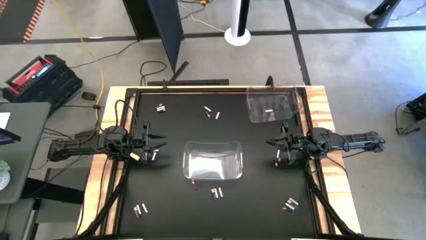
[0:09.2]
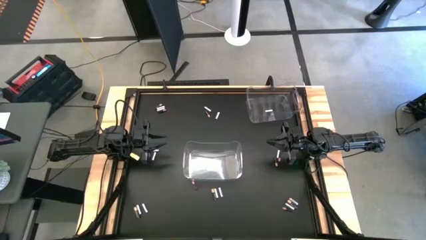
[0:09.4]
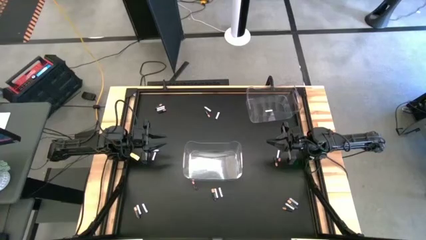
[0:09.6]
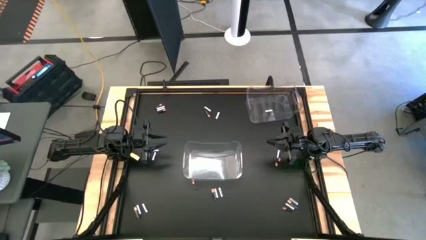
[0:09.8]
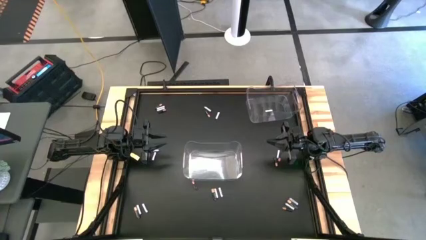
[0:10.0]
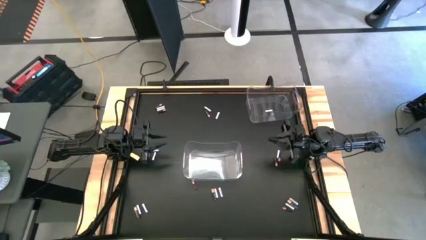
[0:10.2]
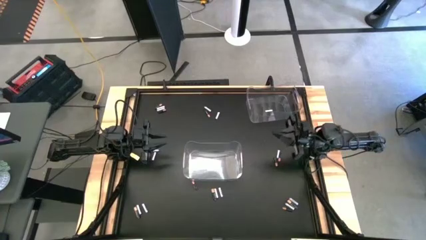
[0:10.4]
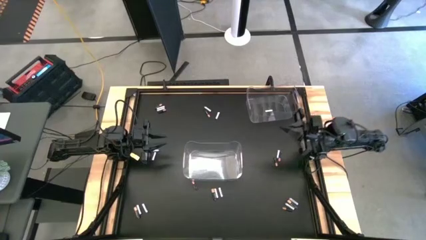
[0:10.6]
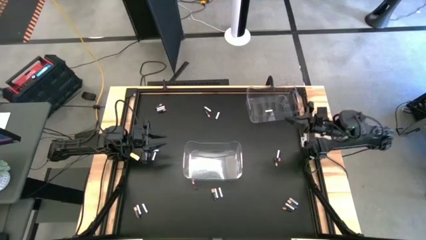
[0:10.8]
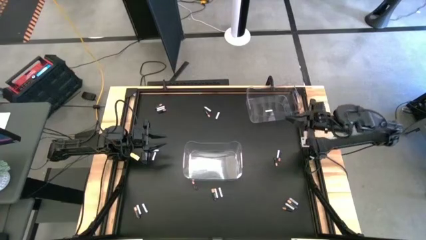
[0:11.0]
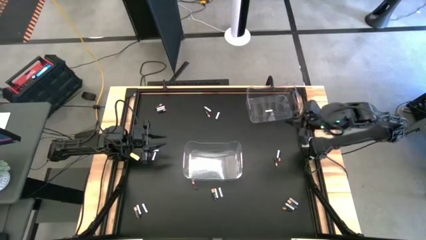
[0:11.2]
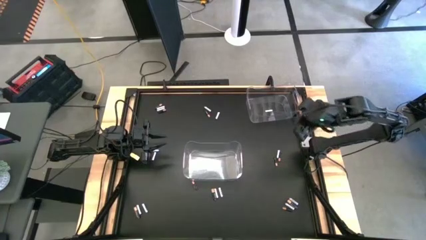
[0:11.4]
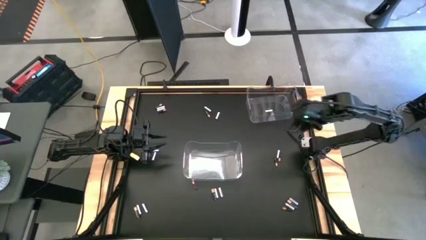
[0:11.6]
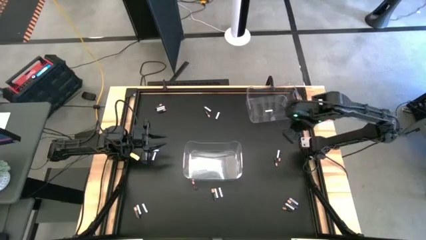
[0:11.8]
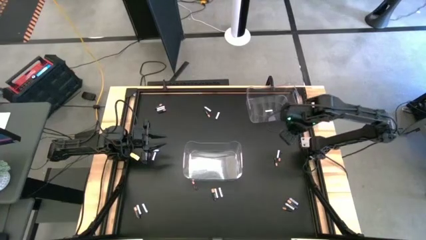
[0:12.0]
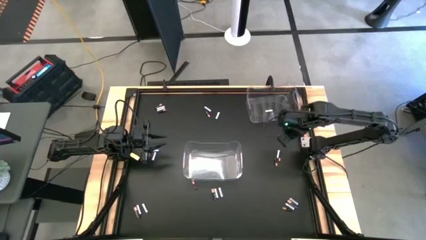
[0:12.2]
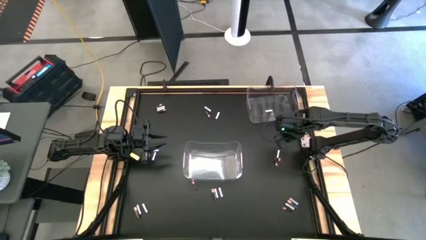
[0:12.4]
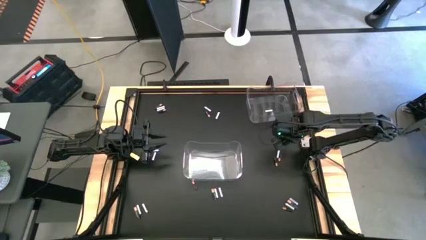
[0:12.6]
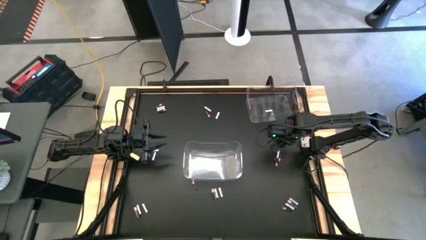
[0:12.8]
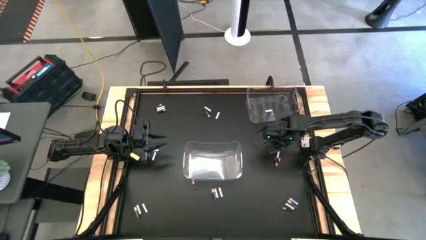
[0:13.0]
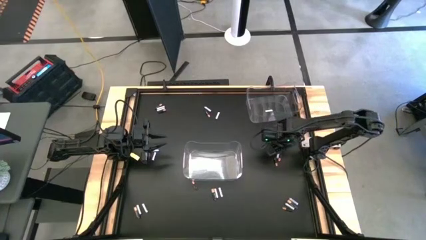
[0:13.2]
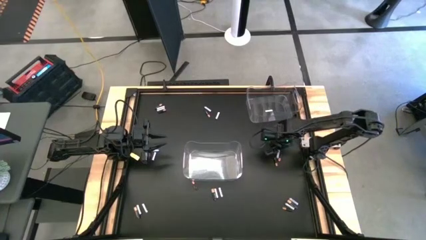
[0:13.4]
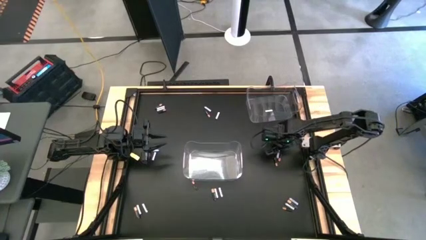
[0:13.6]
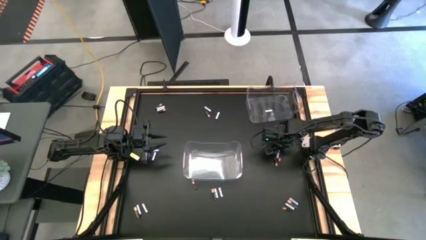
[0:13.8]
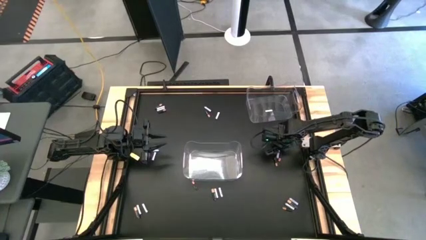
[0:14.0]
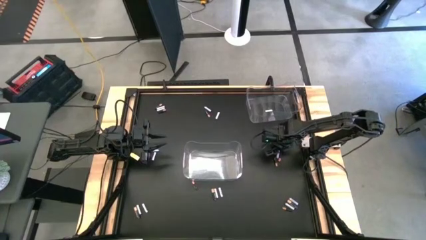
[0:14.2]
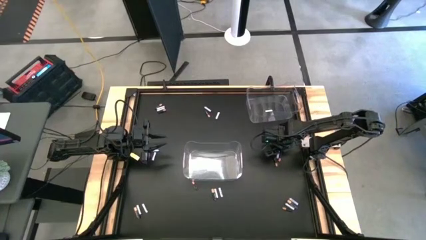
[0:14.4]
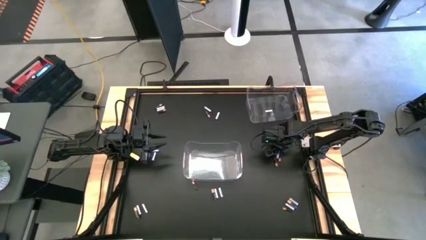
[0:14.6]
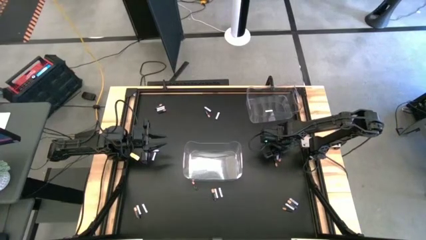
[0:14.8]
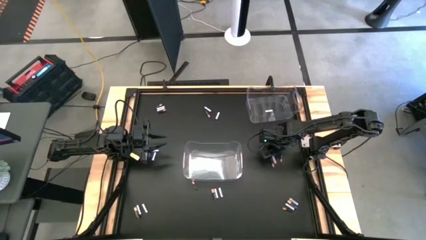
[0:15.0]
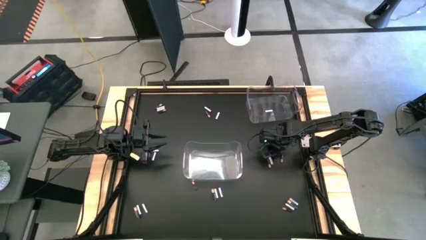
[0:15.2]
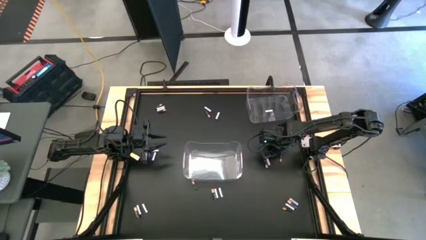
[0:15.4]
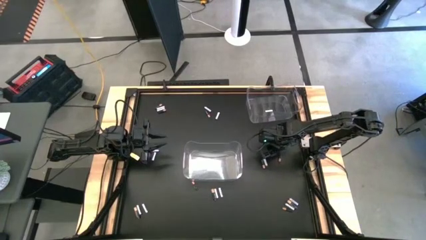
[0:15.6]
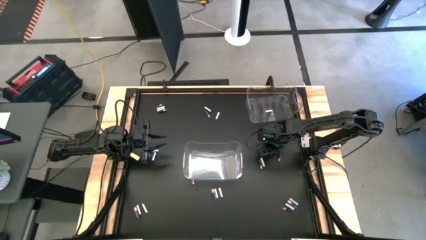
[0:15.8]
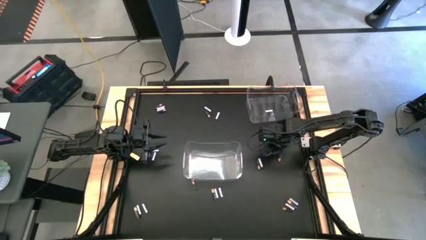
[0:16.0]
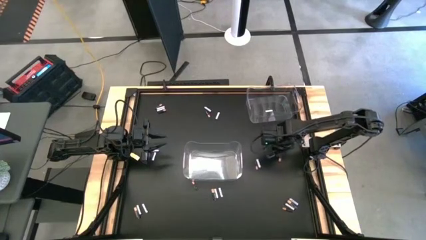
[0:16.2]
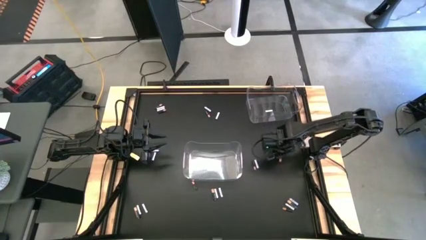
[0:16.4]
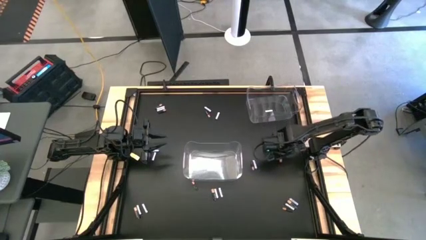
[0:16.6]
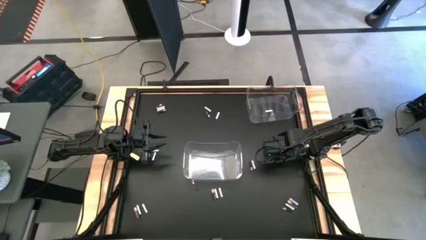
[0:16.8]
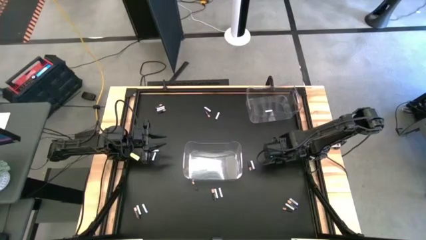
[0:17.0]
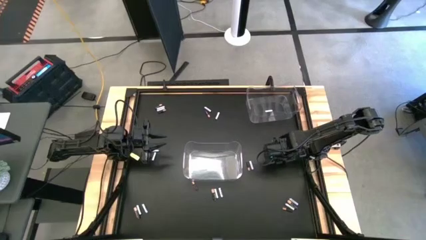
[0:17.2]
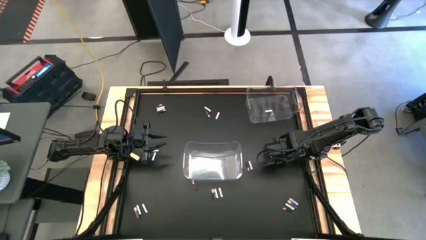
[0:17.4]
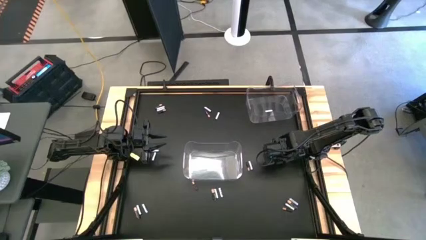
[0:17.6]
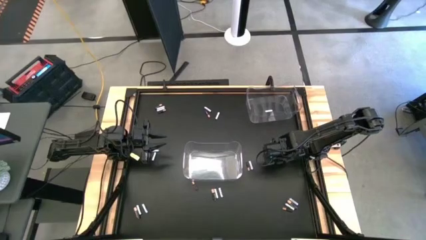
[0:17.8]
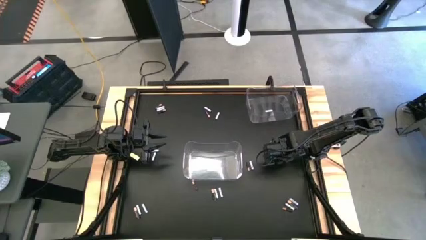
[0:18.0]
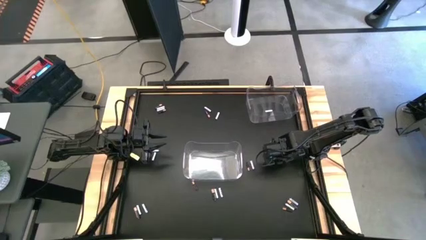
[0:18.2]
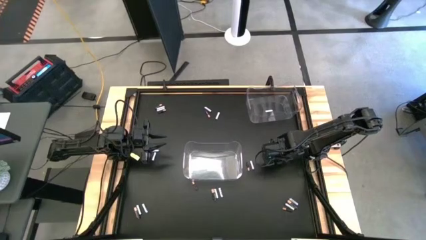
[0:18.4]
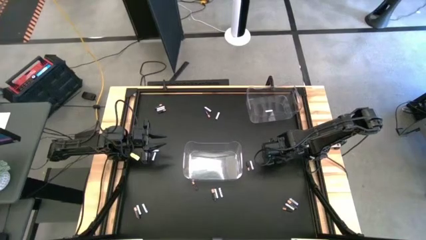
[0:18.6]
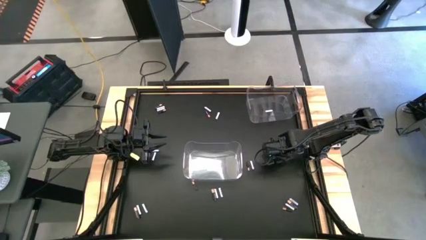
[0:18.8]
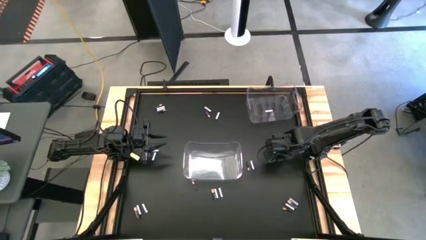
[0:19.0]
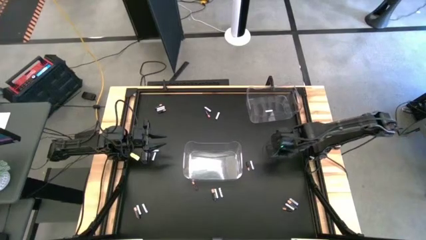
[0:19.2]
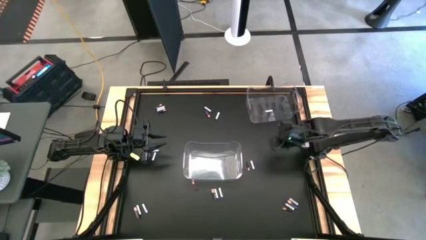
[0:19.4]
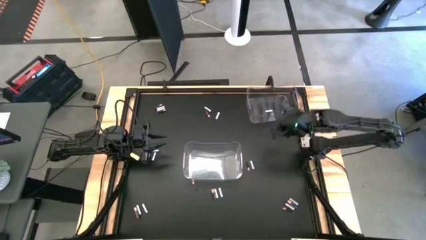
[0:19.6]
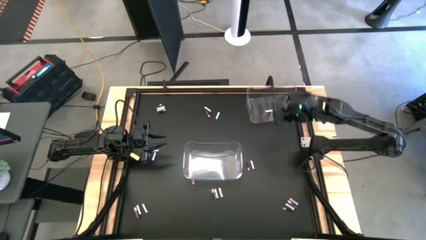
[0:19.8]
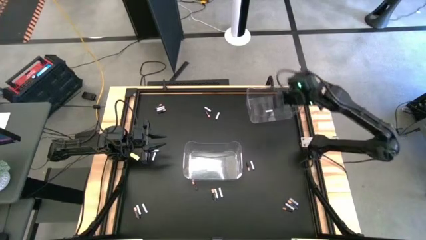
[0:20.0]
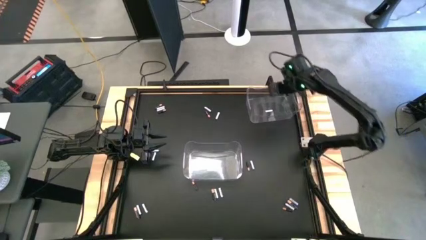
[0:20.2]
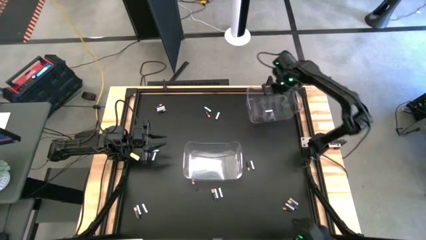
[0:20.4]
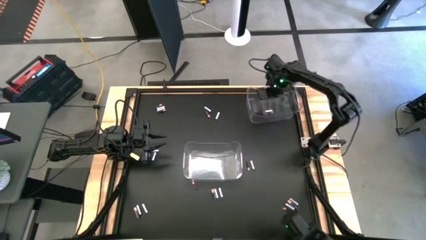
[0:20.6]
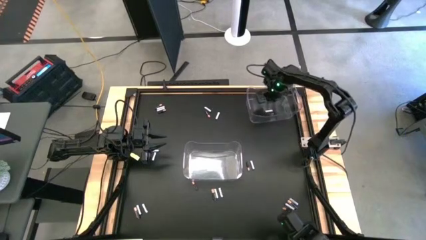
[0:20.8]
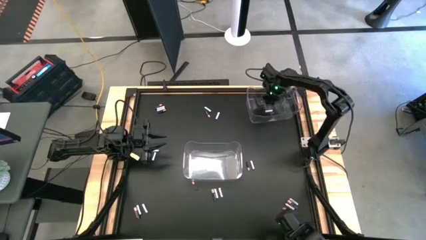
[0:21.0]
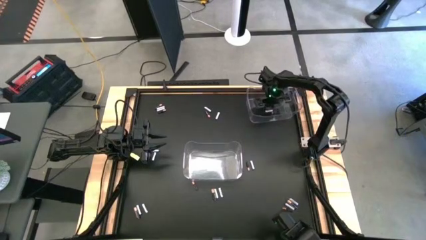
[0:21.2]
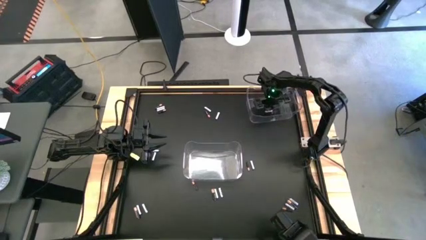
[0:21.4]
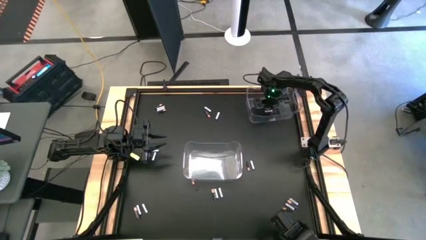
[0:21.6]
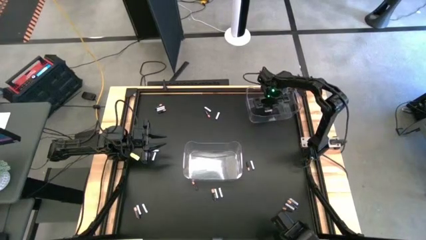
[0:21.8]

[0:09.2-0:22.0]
Task: Sort batteries
Put the black battery into the top transparent bin

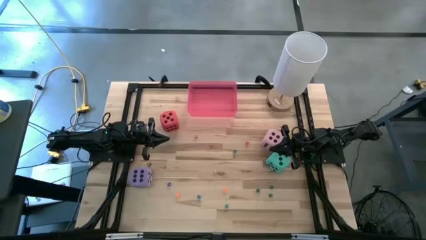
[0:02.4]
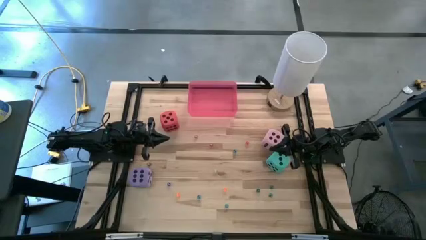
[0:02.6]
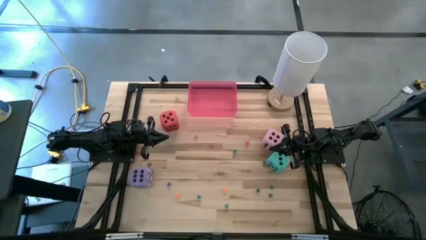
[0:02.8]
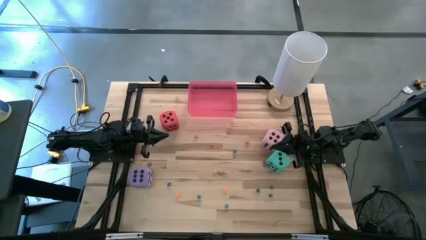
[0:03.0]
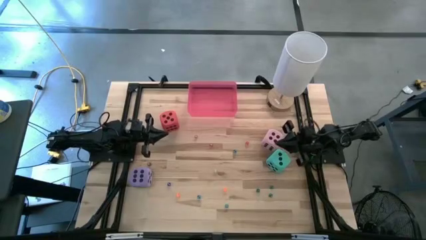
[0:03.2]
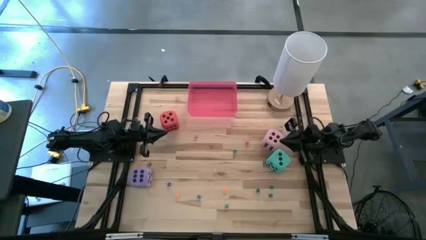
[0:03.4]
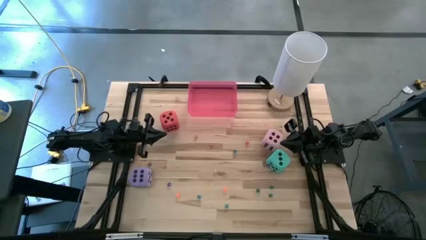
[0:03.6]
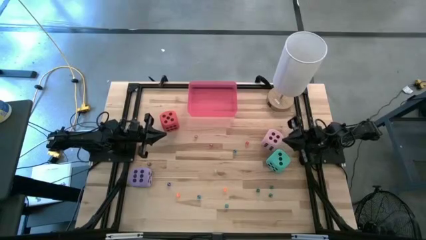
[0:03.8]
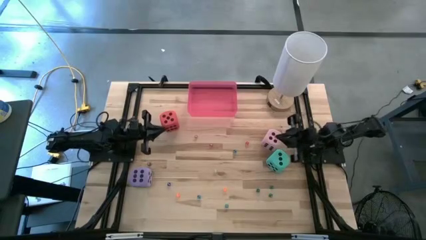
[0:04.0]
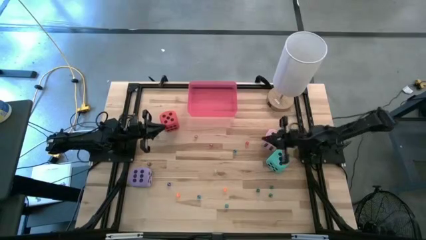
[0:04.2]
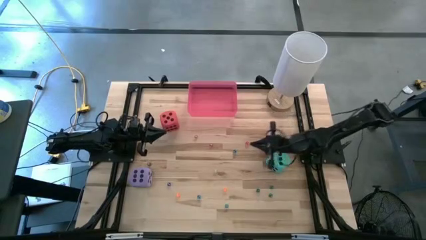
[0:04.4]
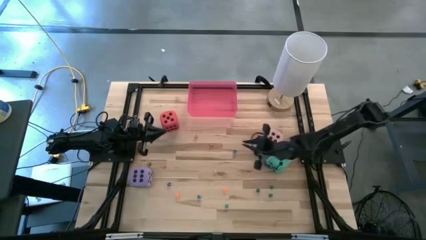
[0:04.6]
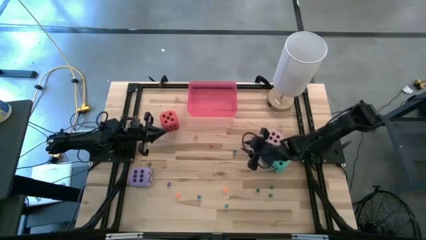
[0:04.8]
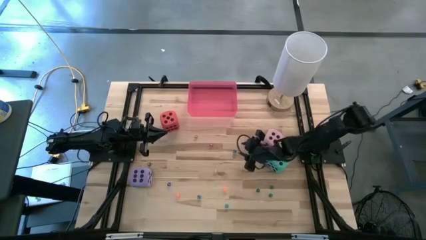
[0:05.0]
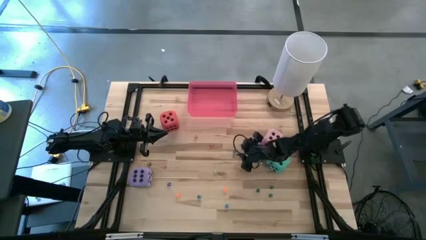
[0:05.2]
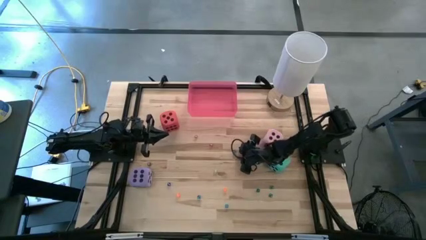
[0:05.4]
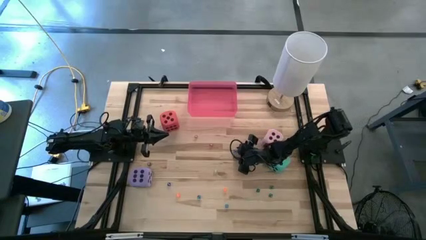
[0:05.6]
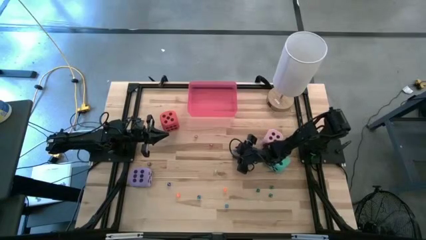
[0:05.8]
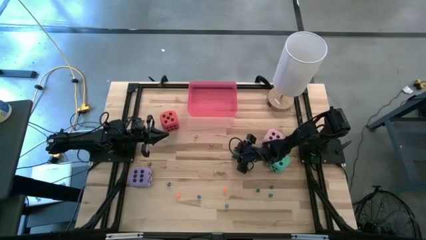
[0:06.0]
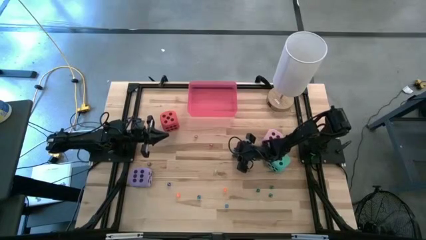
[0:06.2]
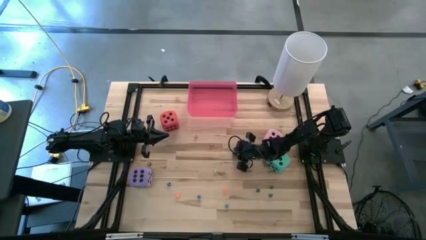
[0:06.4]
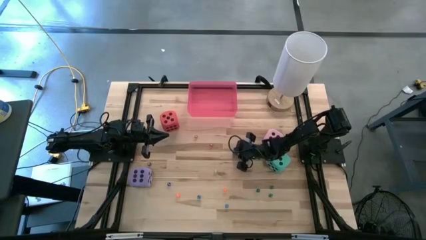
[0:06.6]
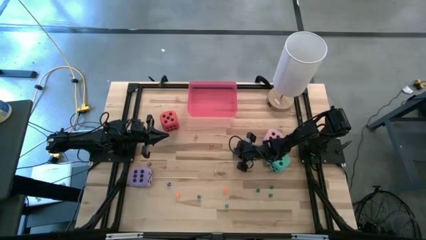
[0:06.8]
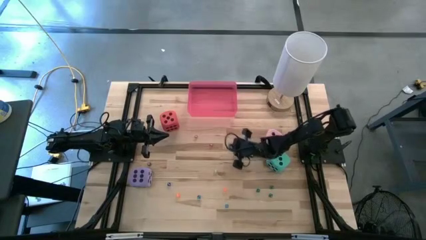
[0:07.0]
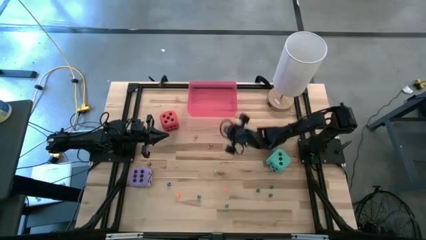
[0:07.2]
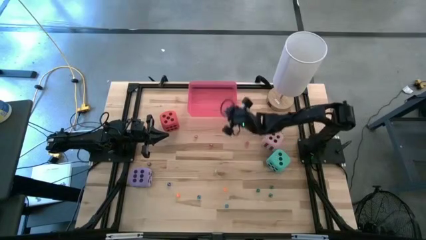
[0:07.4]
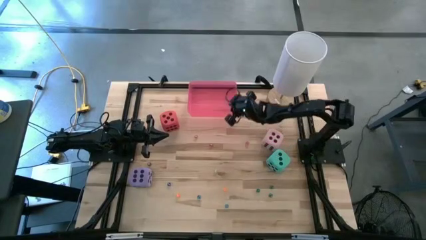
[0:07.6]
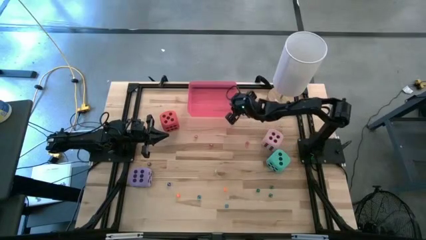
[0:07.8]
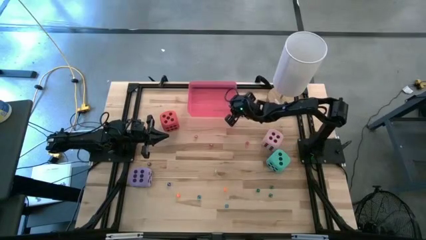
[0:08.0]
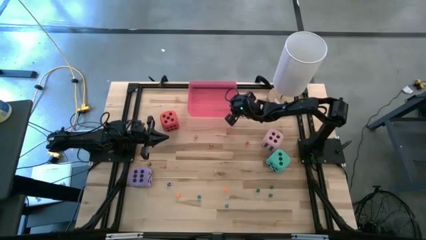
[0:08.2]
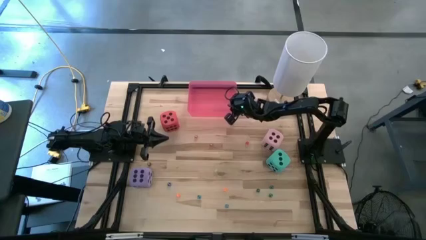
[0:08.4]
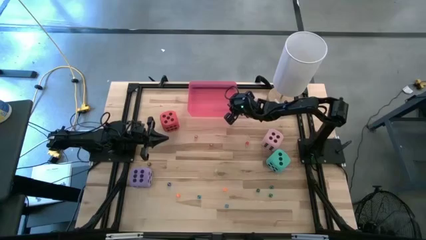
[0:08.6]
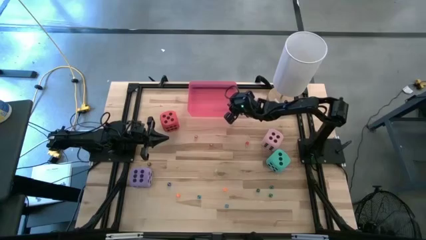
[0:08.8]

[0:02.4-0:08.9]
Task: Pick & Place Dice
Put the small blue dice into the pink bin
